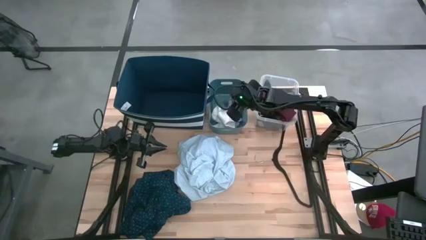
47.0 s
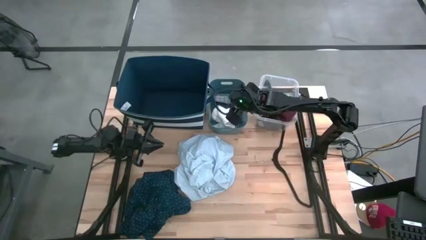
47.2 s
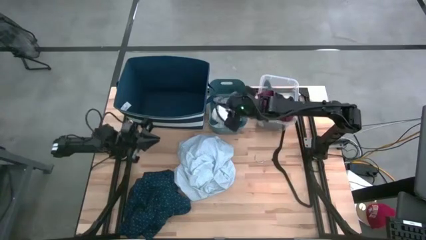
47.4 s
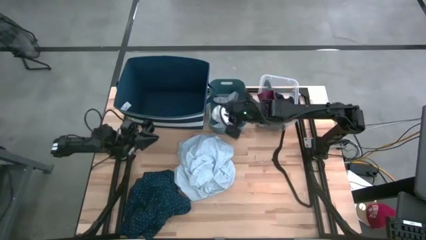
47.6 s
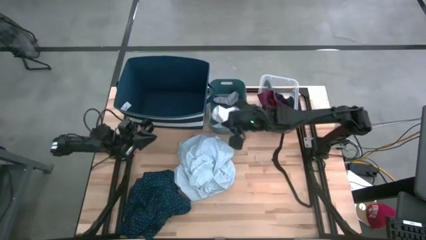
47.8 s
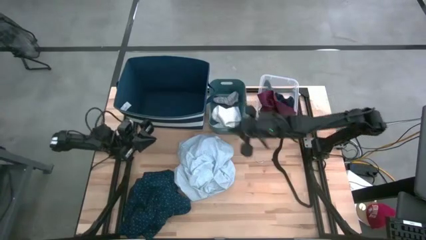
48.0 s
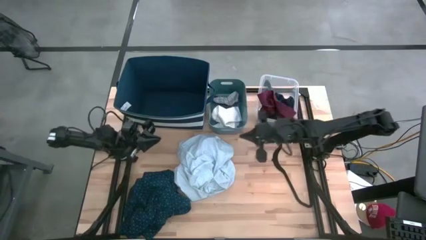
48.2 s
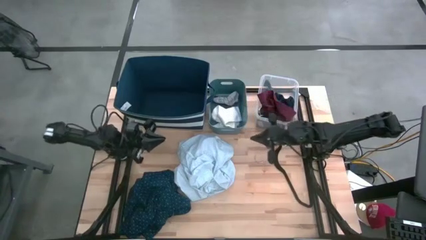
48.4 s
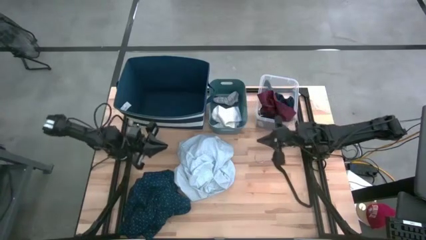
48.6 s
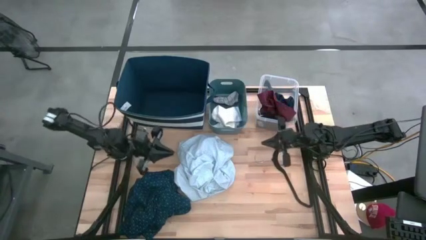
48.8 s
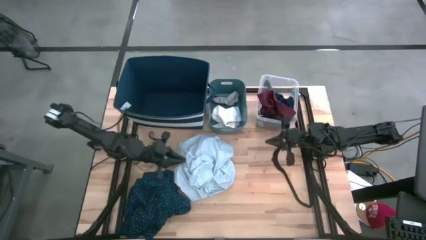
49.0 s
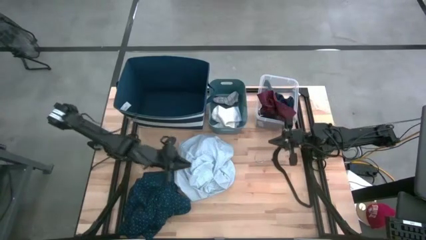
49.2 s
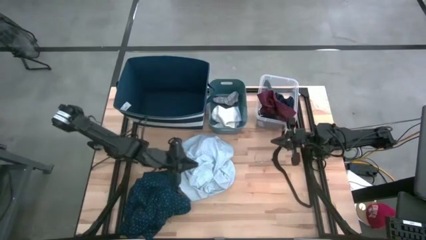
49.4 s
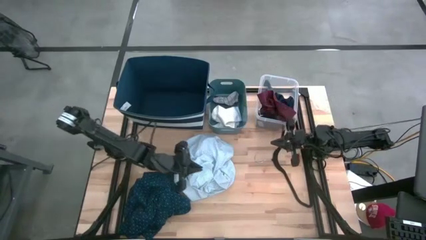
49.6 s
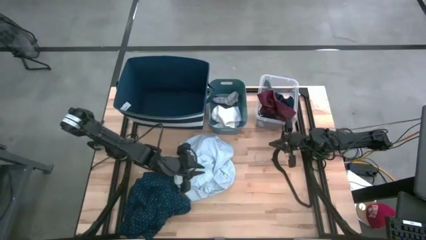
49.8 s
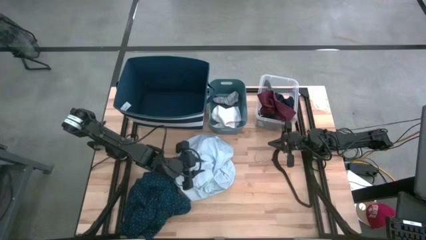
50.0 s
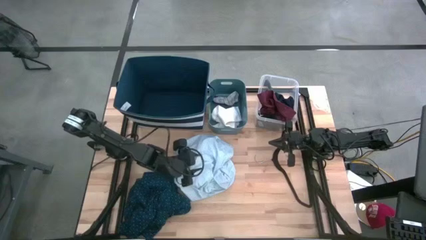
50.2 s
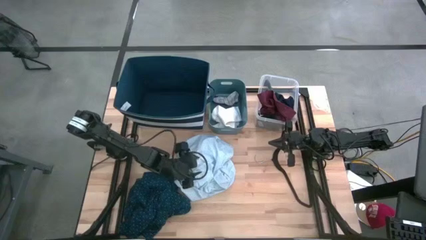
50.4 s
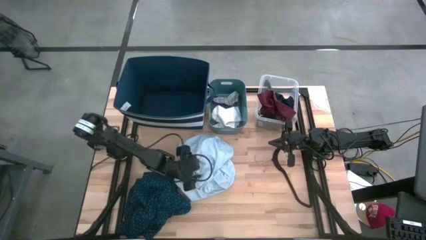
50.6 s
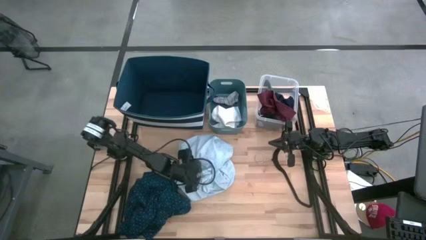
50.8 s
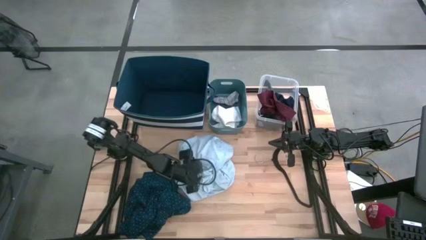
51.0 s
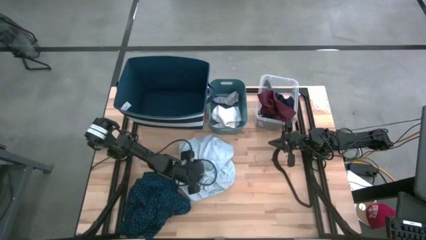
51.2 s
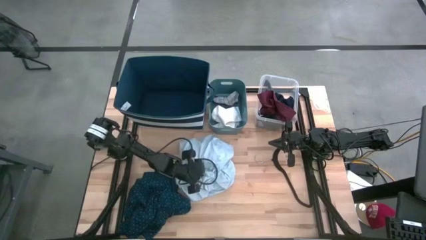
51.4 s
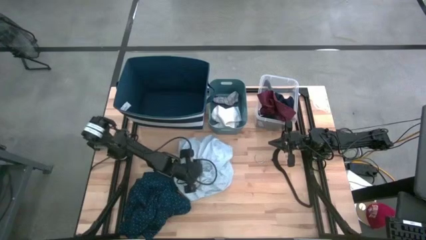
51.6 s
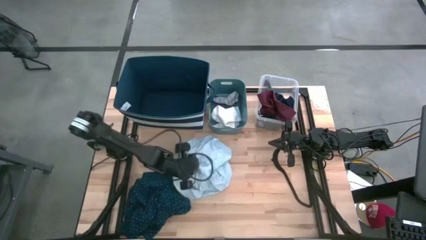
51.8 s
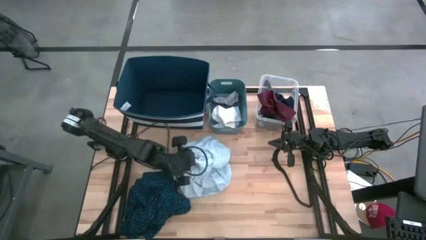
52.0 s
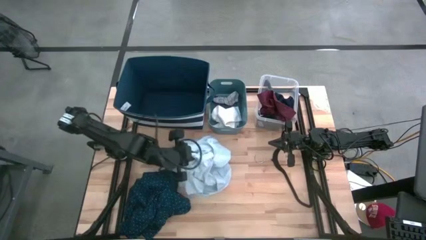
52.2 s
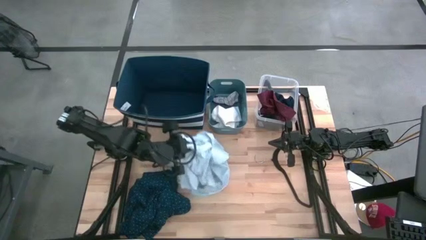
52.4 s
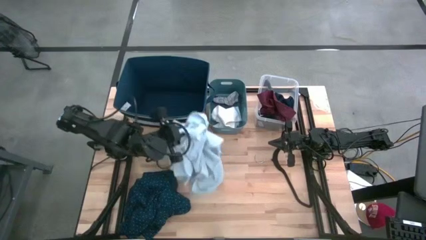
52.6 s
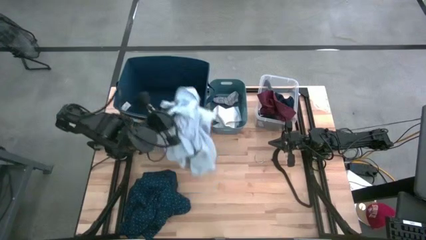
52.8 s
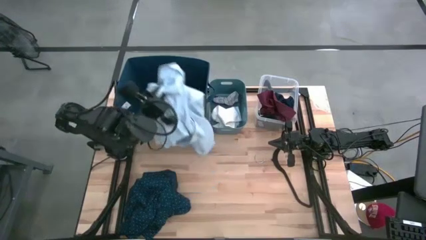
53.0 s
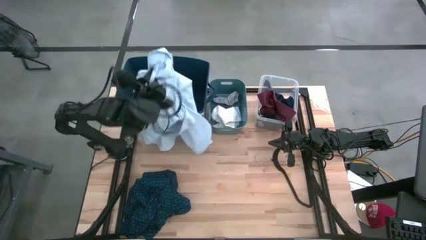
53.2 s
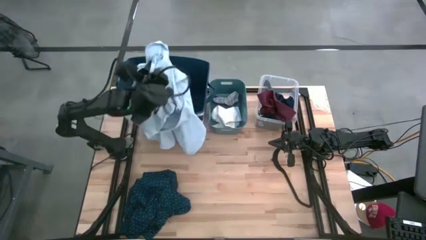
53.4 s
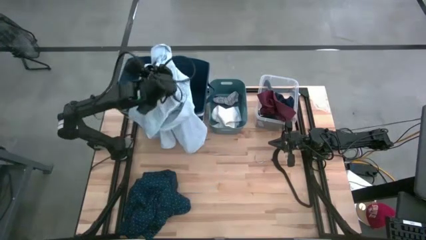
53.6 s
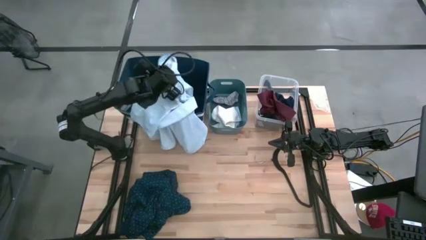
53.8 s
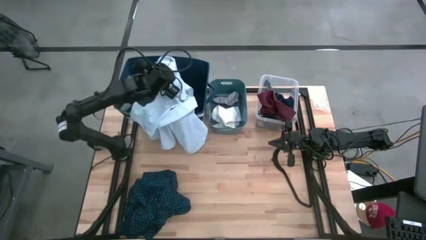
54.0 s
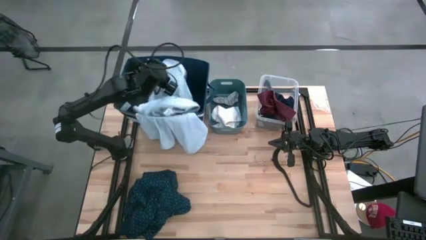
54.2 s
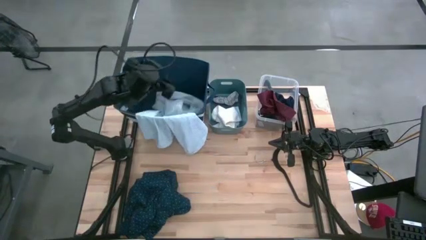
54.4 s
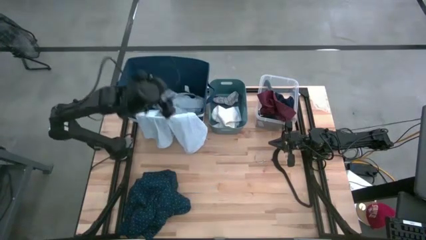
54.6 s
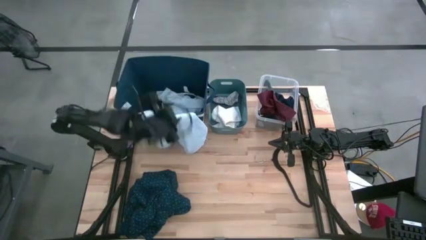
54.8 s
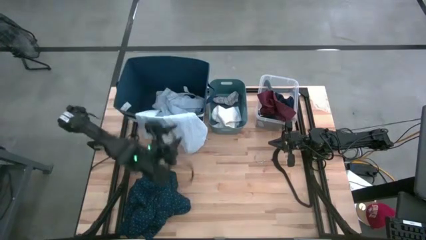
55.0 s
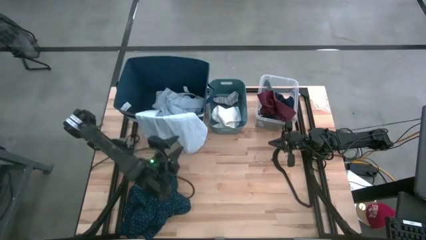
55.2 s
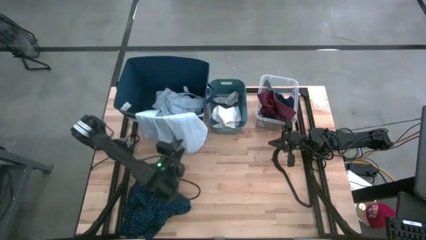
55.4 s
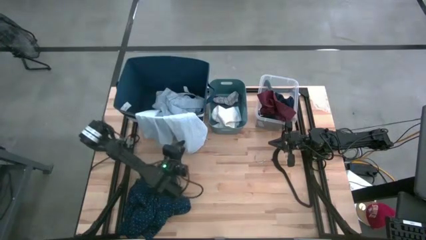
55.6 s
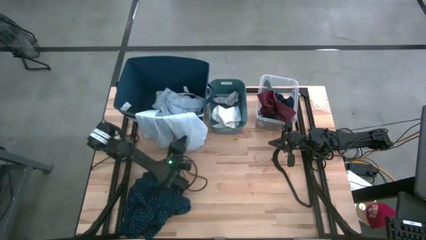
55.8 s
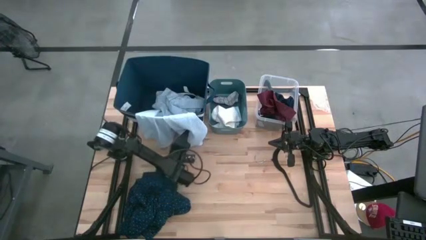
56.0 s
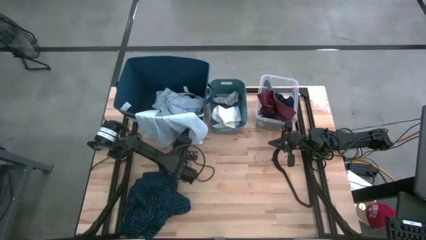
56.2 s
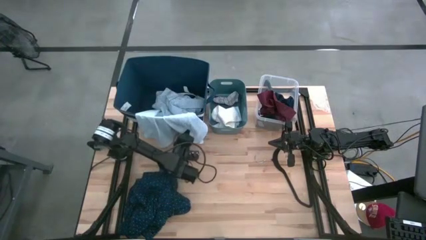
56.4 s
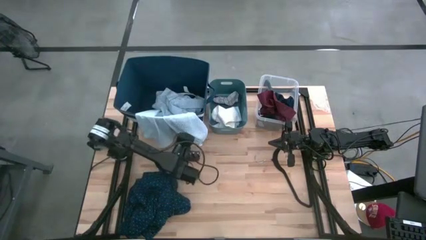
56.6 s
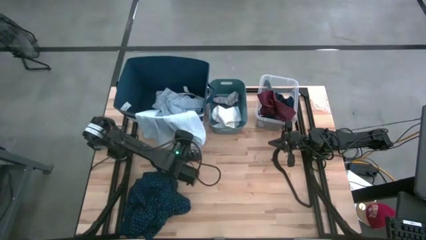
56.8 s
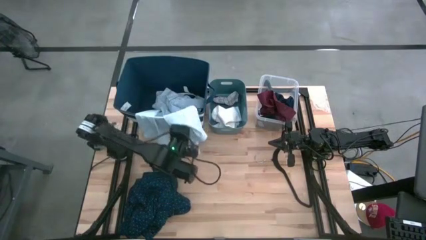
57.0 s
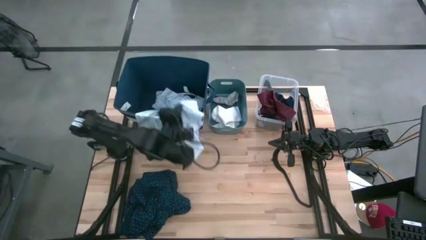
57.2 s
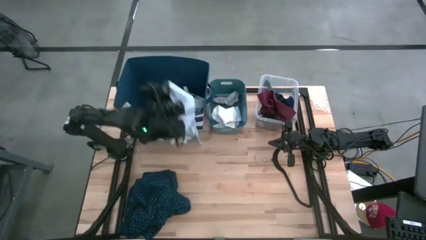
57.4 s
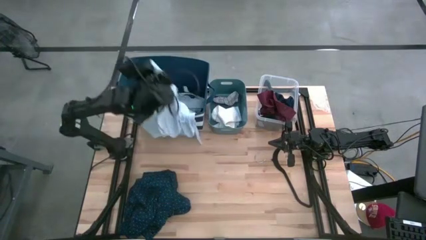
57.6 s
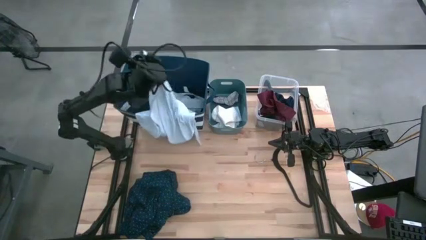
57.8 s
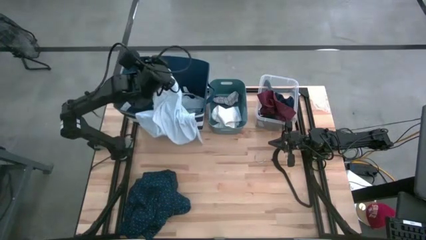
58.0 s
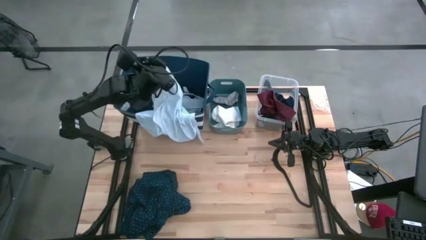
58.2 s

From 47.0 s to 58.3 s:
Task: Pick & Place Cloths
Put the light blue polo shirt into the blue bin

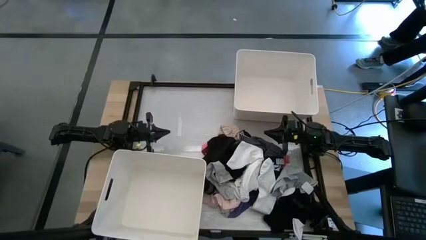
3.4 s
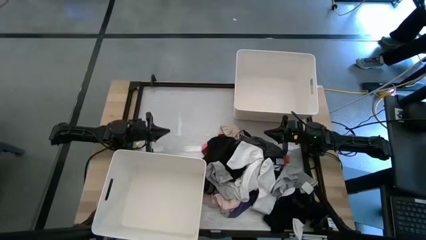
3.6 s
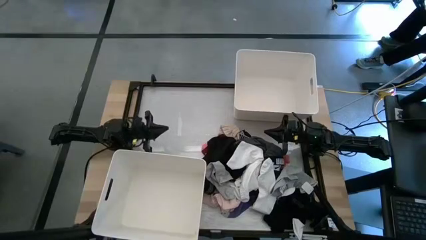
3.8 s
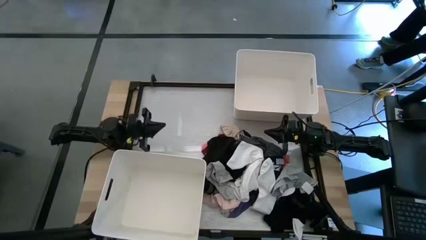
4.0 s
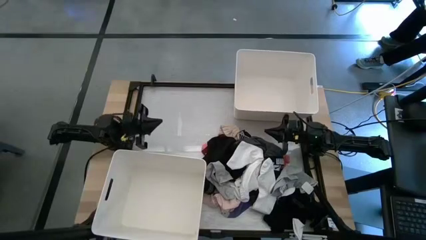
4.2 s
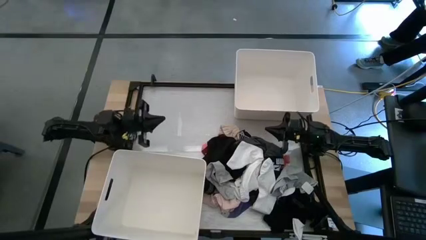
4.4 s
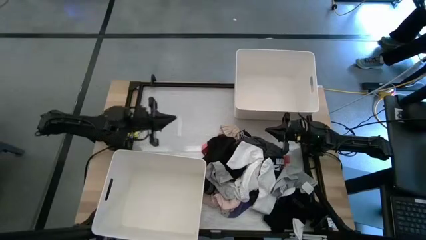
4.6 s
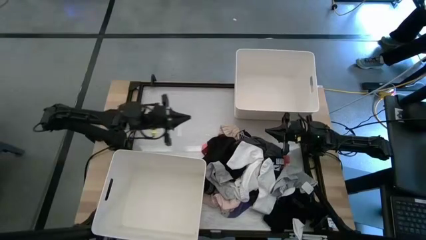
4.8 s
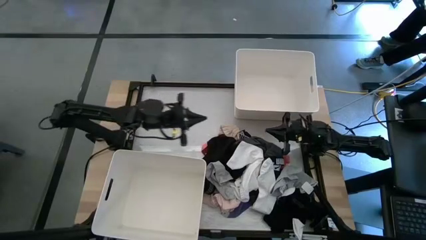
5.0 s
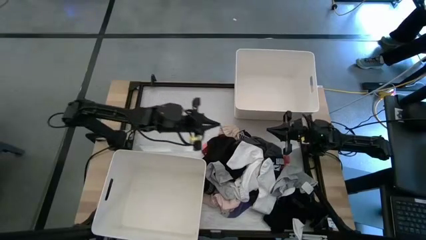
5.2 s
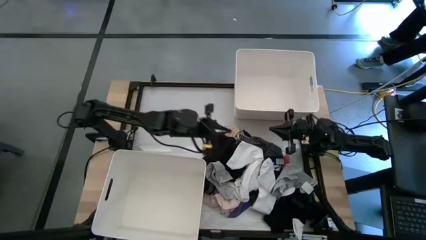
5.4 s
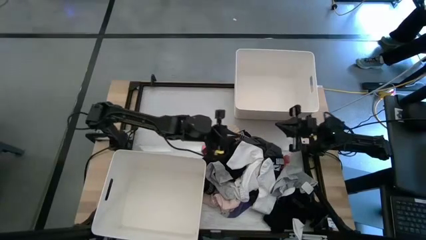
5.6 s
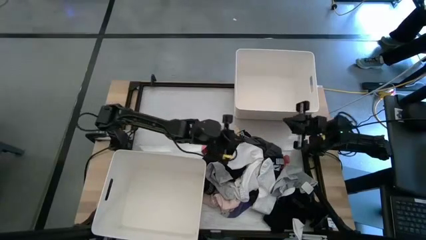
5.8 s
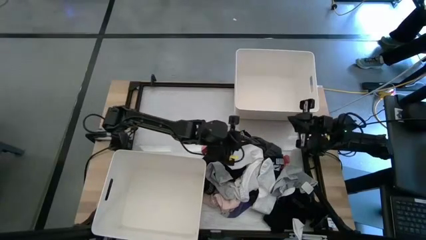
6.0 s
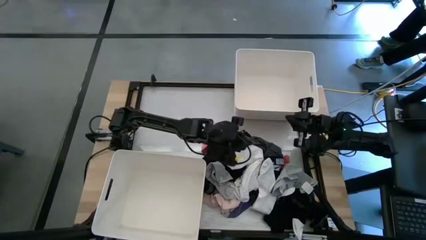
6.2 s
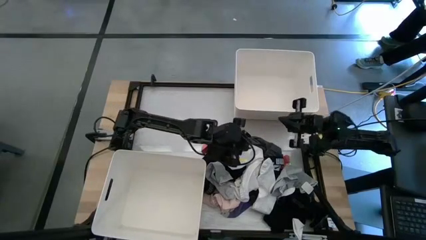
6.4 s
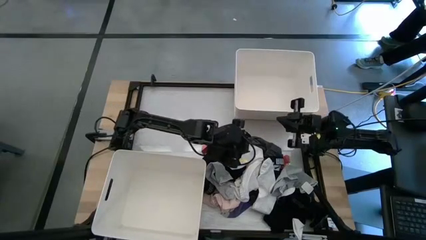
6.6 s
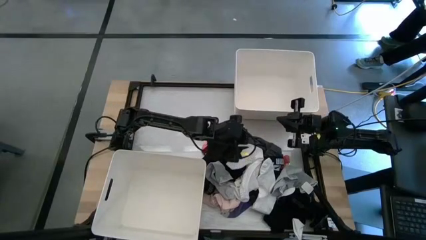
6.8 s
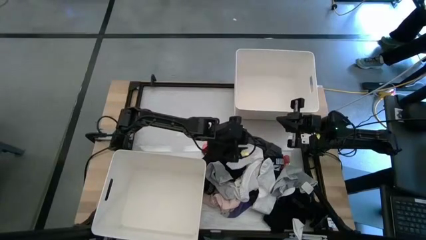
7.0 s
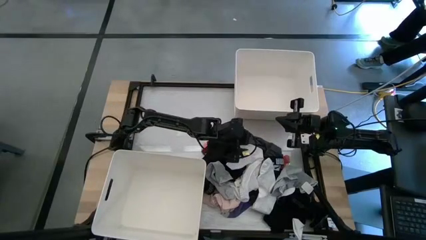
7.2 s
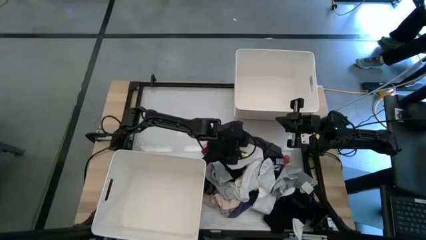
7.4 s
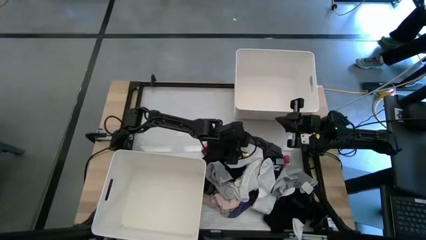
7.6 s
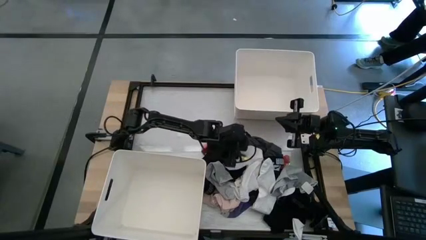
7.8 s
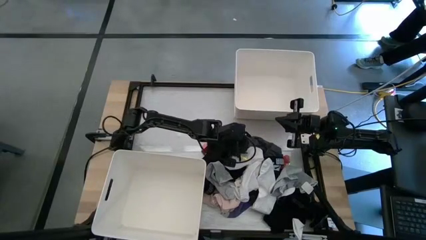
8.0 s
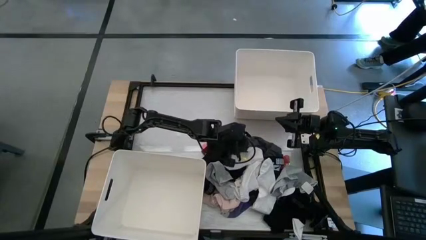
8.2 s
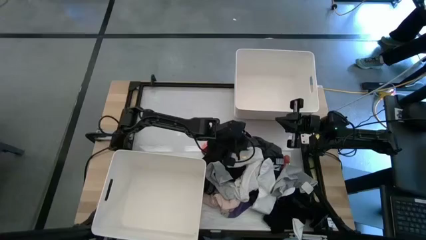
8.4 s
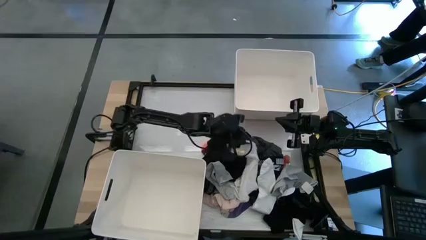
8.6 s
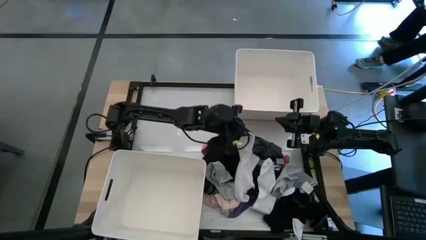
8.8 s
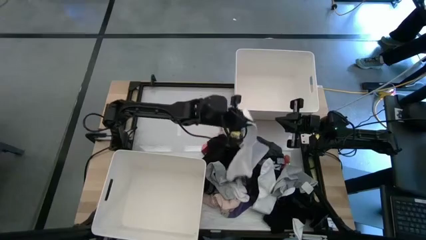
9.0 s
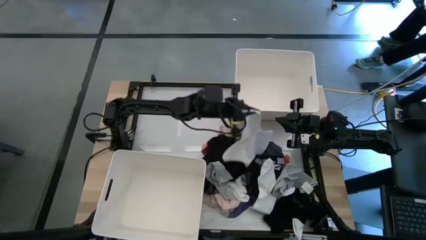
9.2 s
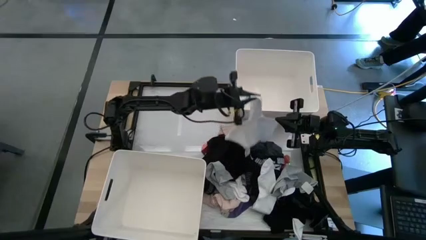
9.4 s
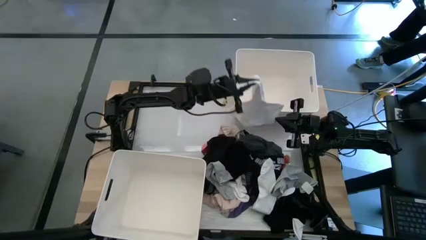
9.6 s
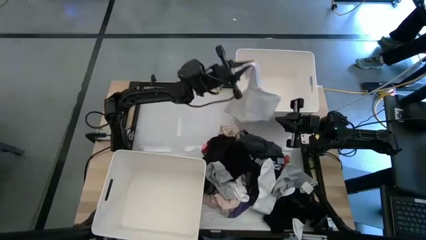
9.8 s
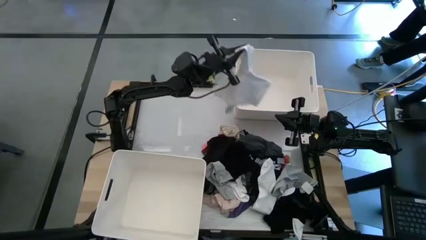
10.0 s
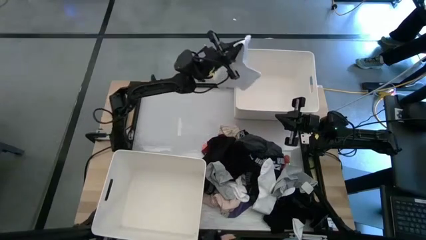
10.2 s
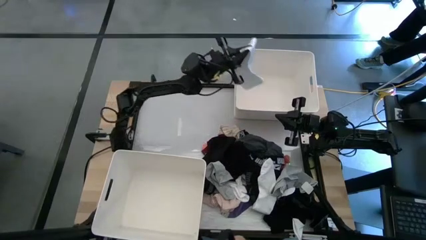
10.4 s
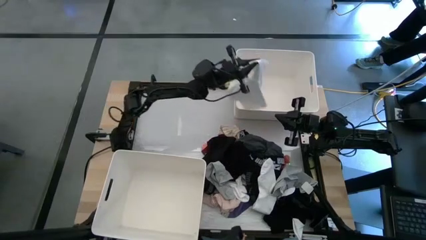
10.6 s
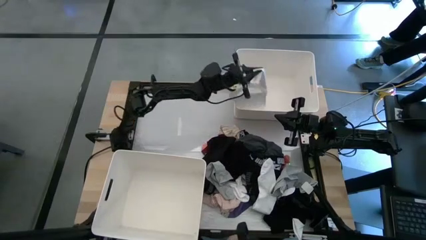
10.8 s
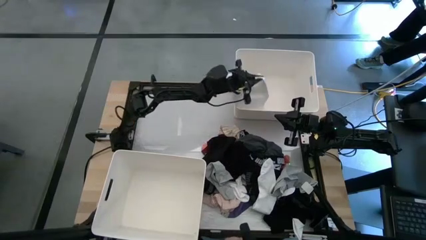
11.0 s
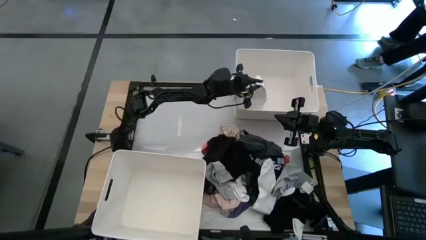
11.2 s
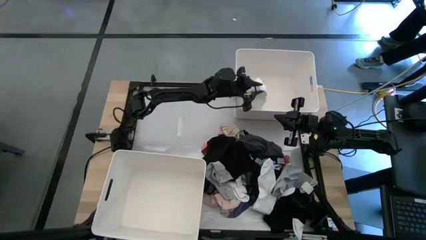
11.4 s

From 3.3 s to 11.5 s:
Task: Sort clothes
Put the white underwear into the top white laundry bin
